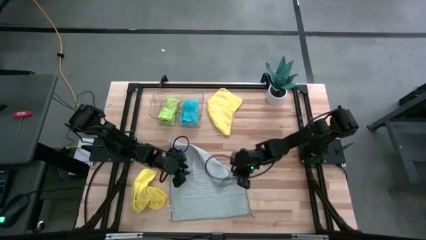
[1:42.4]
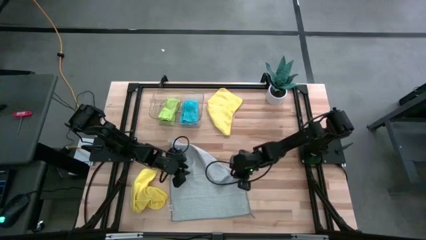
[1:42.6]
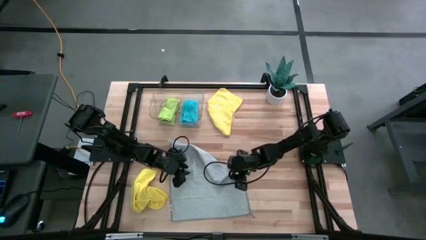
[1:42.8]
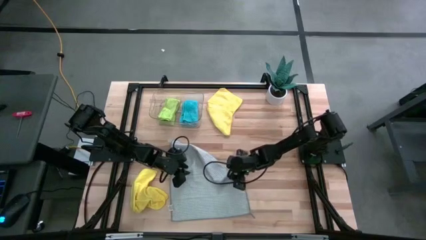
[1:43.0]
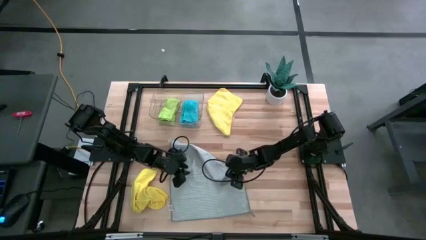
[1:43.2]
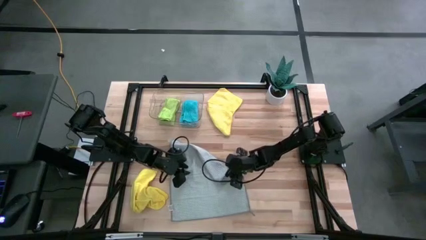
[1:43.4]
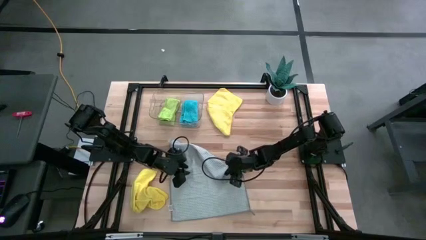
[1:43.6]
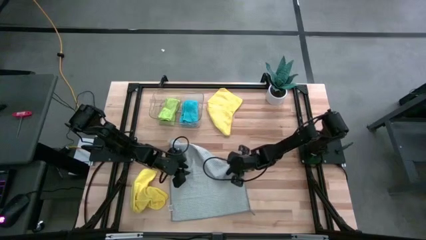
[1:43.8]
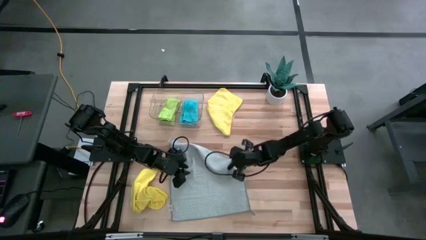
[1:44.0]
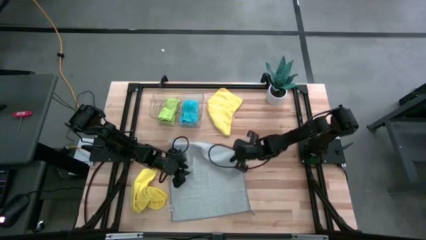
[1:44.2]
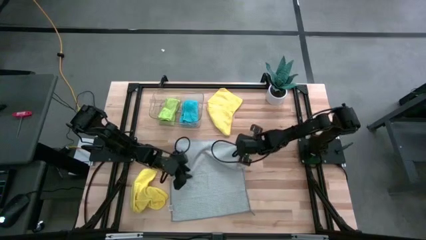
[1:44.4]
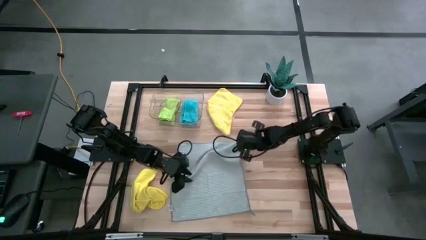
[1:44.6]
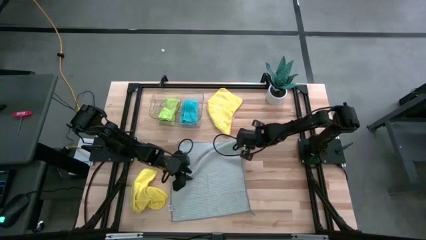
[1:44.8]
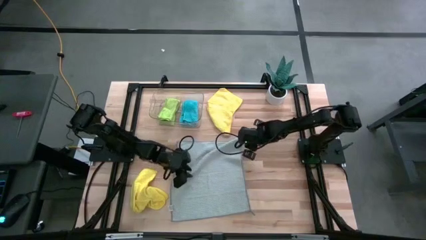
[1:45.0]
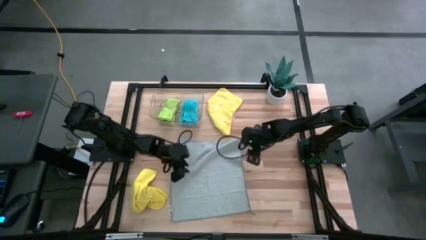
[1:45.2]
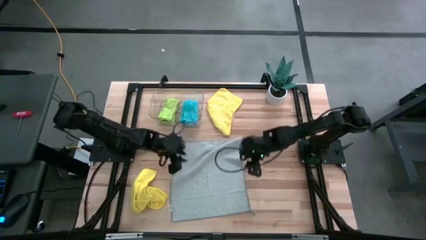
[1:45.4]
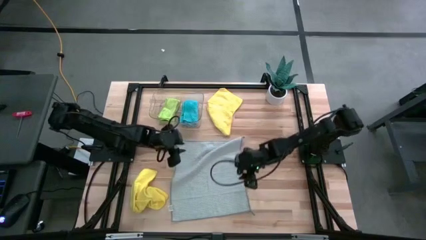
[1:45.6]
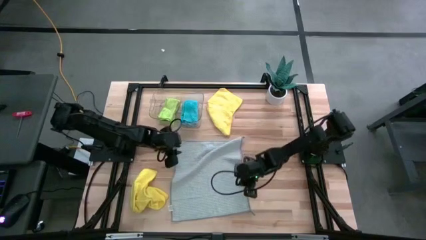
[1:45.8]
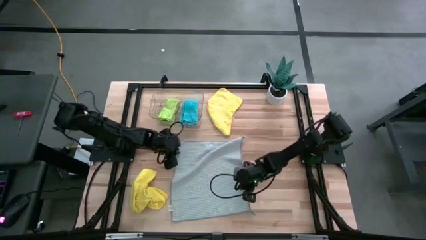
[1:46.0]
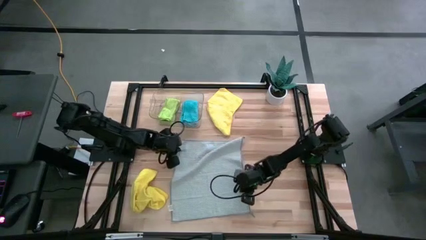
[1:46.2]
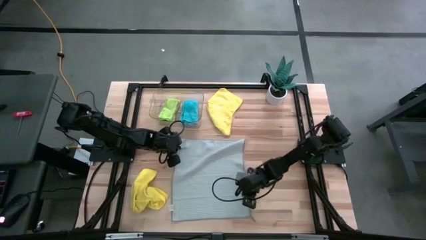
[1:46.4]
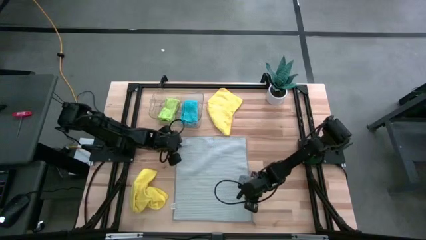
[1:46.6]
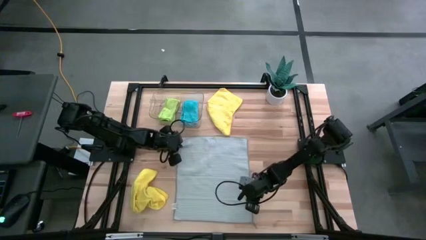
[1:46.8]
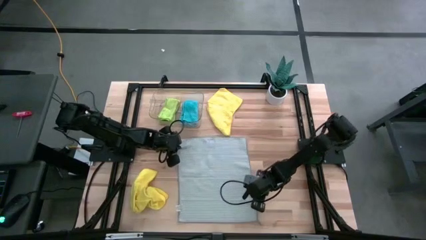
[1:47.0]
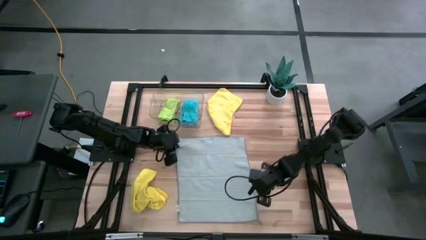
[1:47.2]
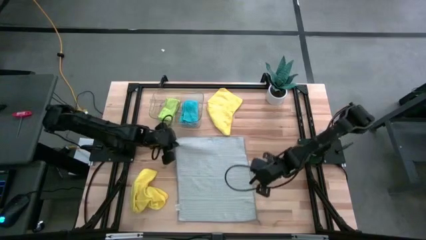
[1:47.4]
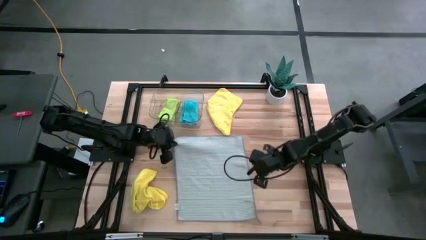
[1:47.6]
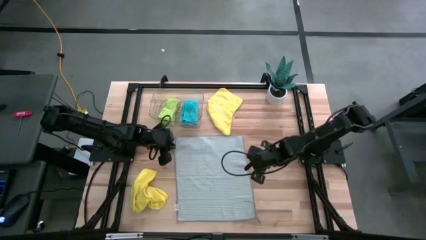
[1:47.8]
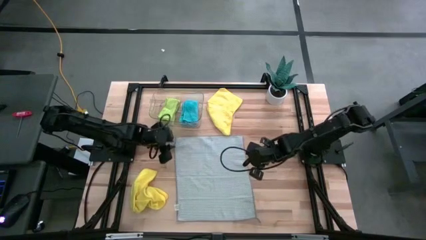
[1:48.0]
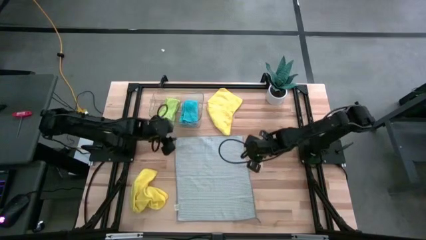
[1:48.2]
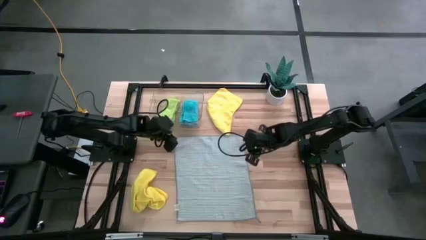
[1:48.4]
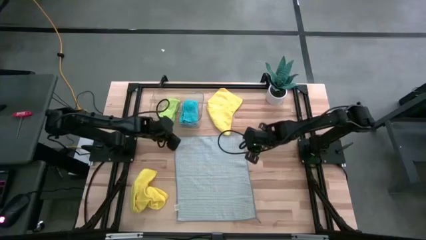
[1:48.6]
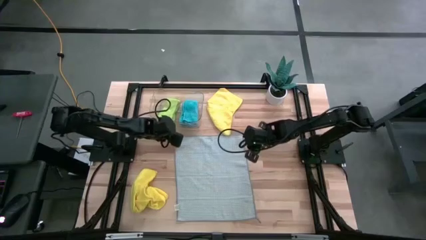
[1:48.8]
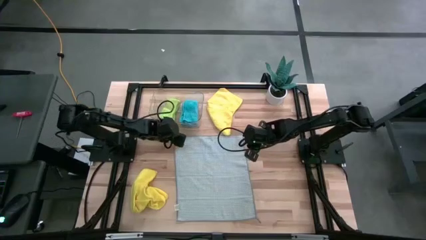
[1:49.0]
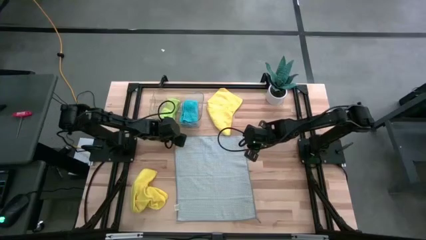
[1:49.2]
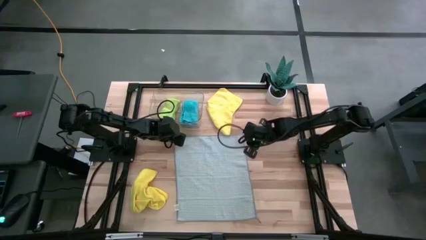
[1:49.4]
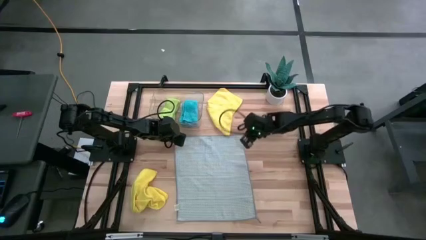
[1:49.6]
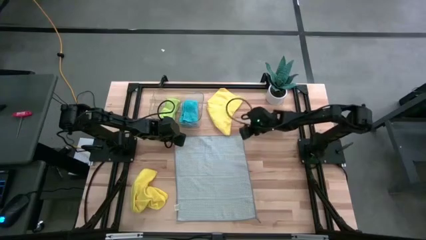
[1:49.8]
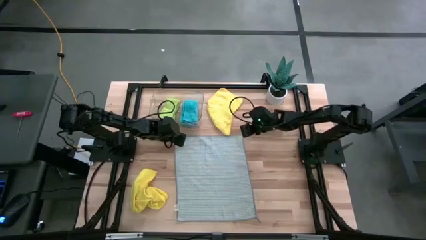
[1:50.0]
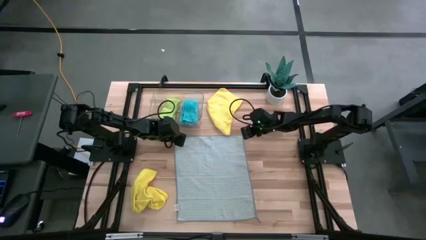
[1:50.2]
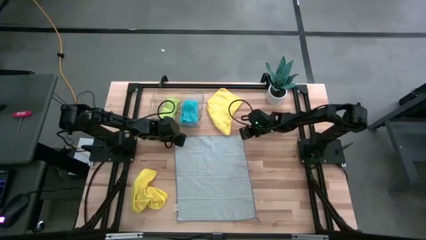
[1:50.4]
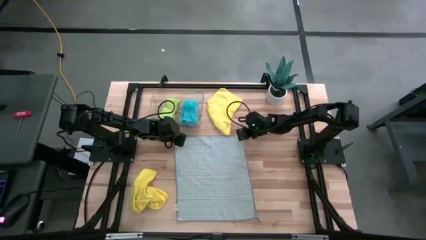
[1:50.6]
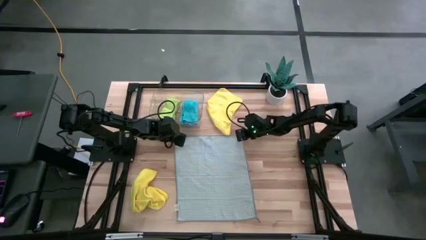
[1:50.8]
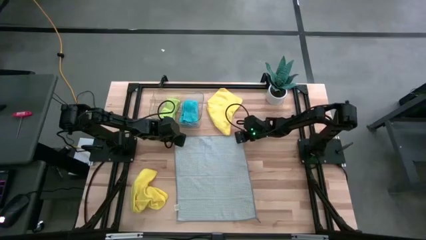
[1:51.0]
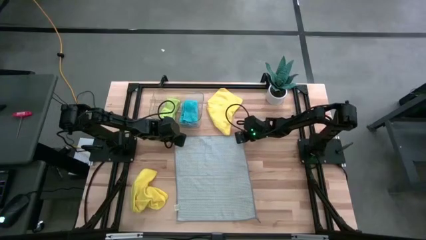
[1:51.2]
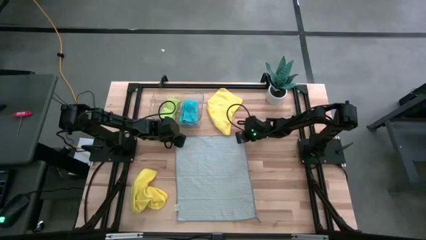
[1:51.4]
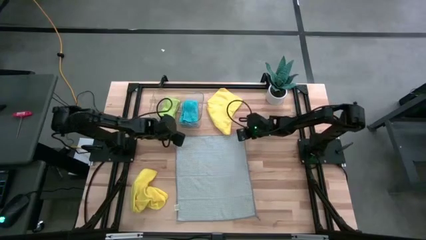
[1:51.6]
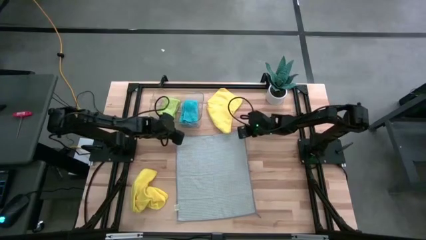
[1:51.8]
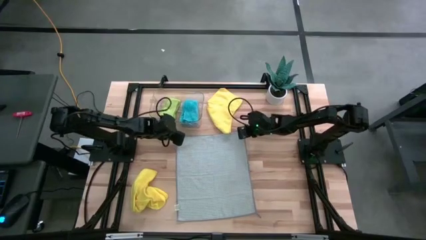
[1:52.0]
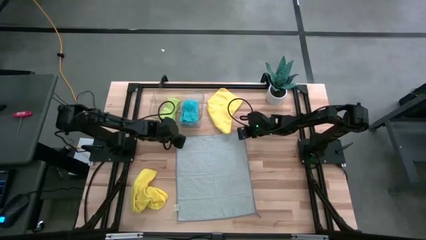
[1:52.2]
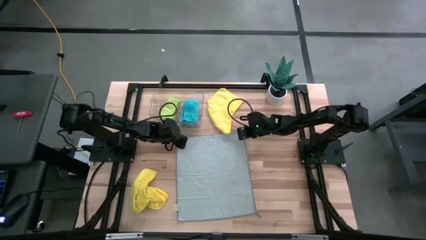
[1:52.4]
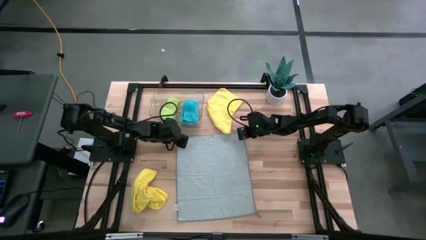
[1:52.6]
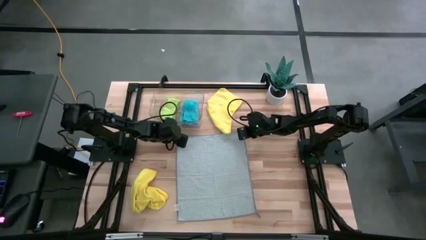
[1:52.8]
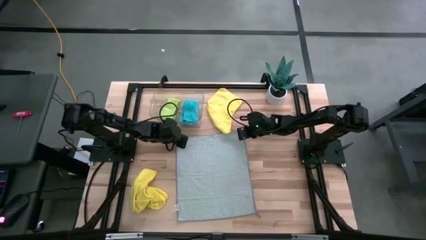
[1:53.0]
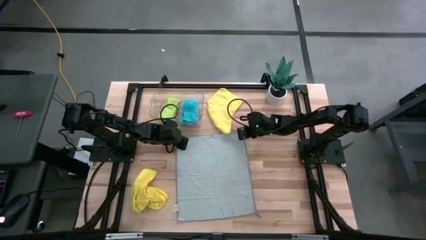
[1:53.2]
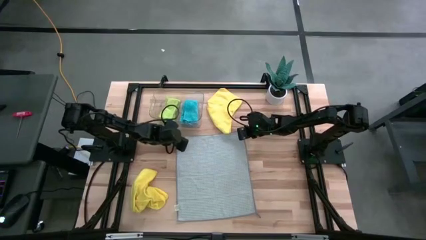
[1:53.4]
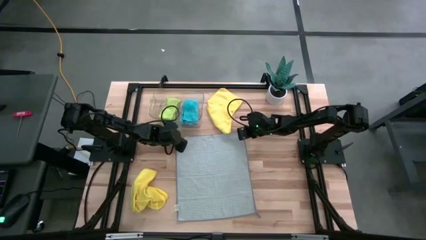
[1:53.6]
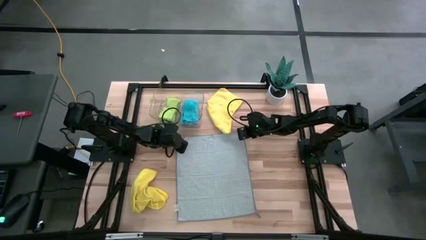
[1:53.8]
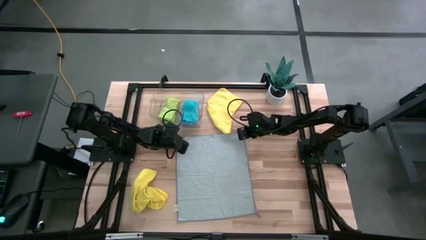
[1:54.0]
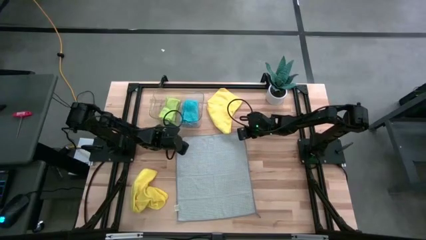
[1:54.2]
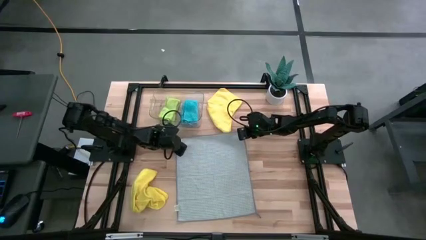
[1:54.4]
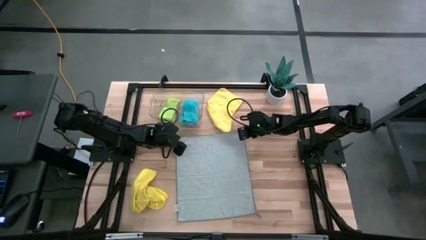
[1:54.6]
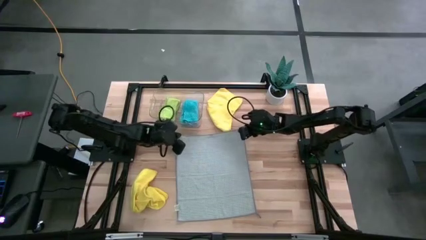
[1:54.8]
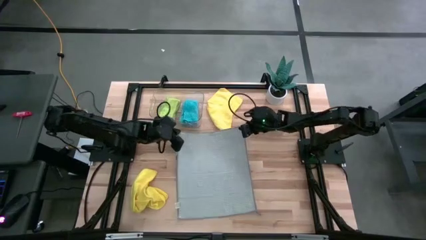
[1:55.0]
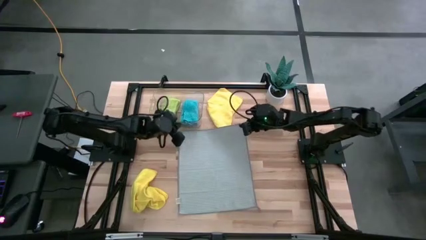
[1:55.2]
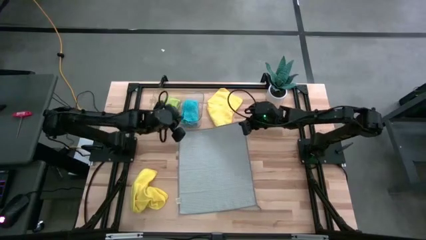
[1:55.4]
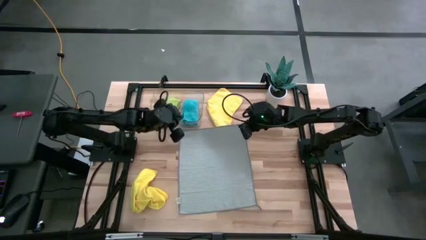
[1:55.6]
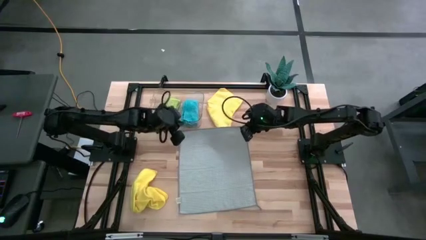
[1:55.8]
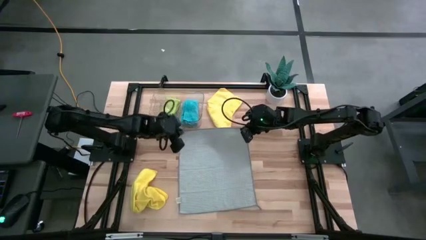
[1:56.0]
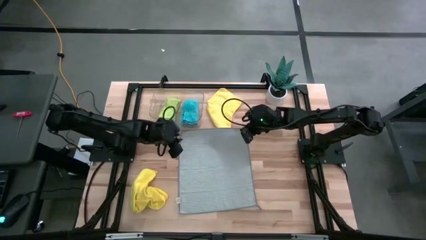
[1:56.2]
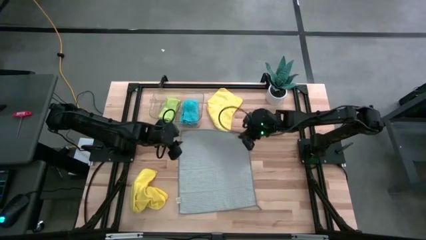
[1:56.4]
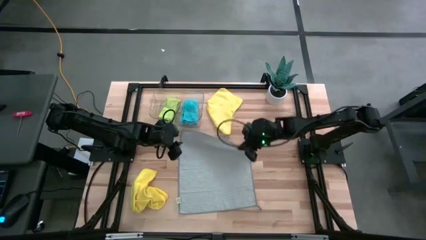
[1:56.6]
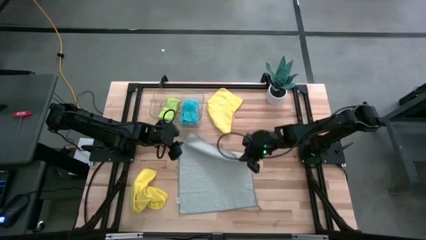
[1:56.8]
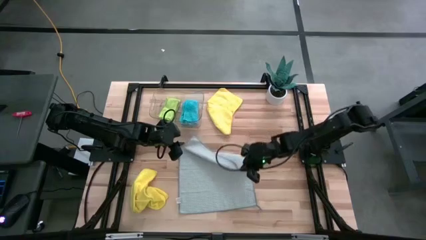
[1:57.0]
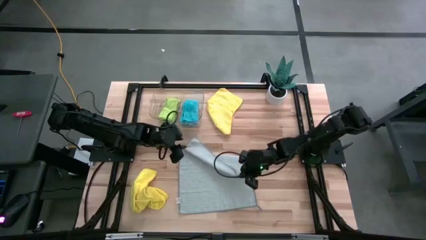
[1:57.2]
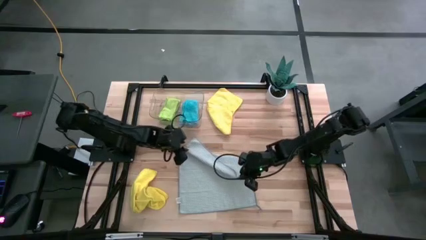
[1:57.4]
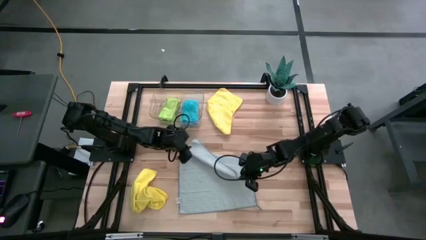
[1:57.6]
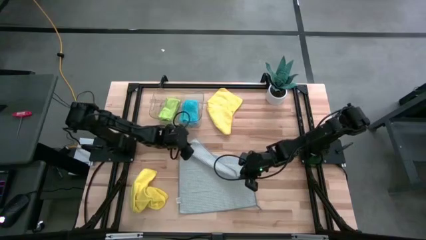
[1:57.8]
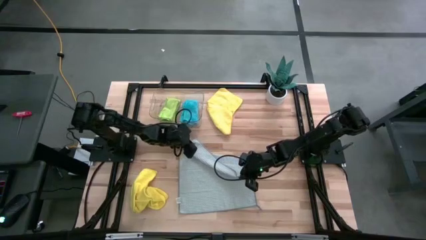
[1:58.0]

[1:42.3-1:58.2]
Task: Fold microfiber towels
Fold the gray towel
